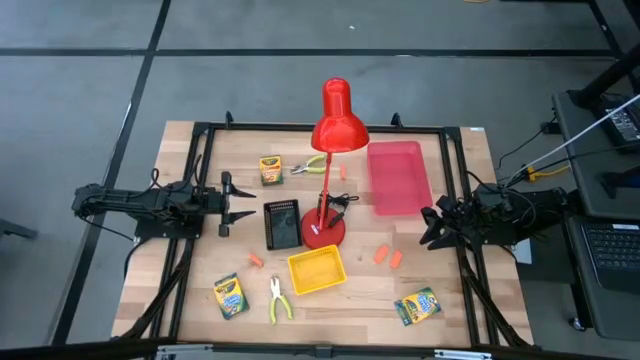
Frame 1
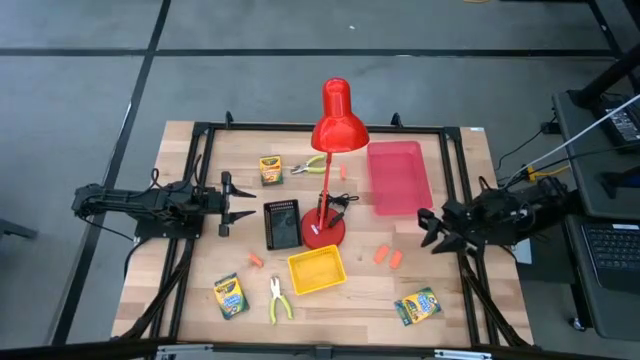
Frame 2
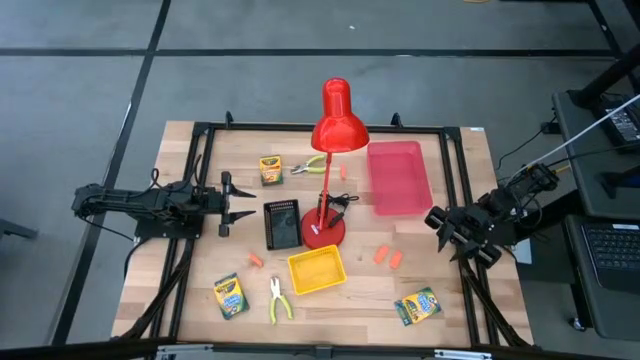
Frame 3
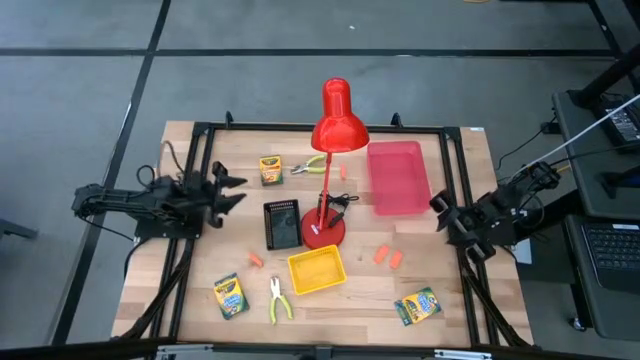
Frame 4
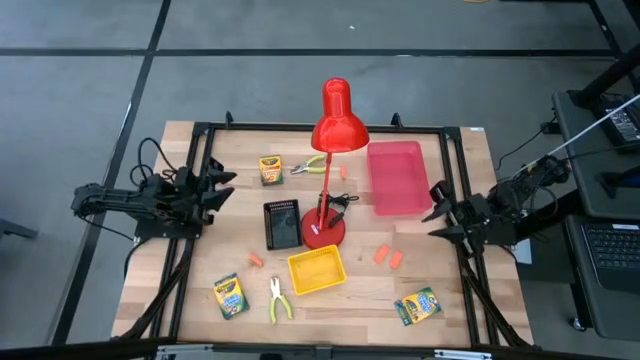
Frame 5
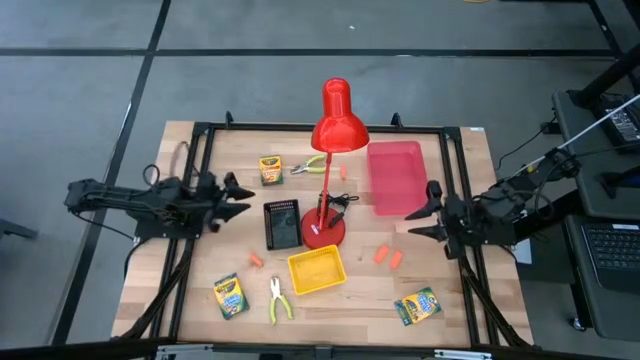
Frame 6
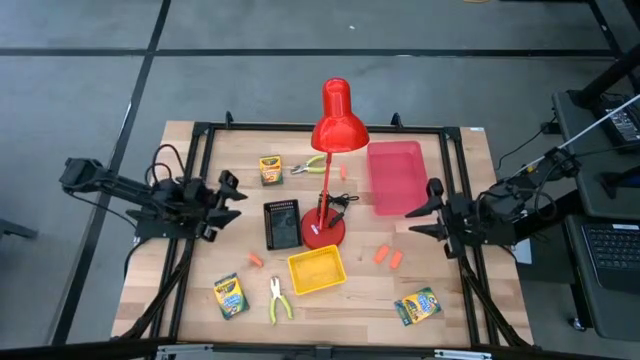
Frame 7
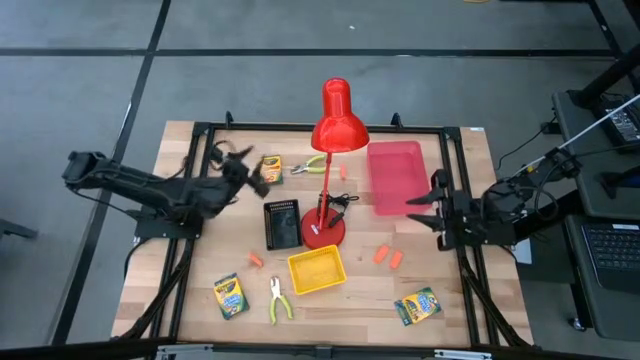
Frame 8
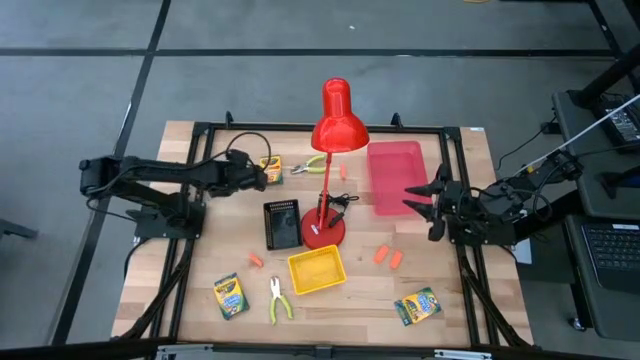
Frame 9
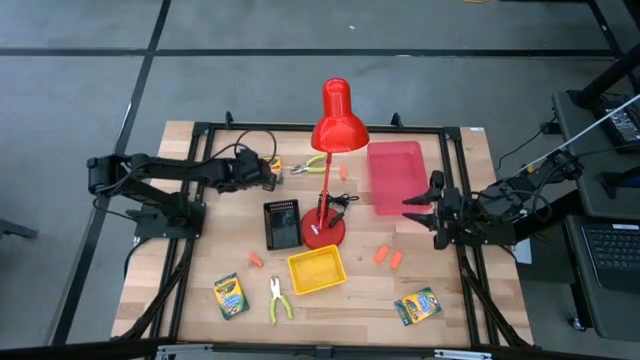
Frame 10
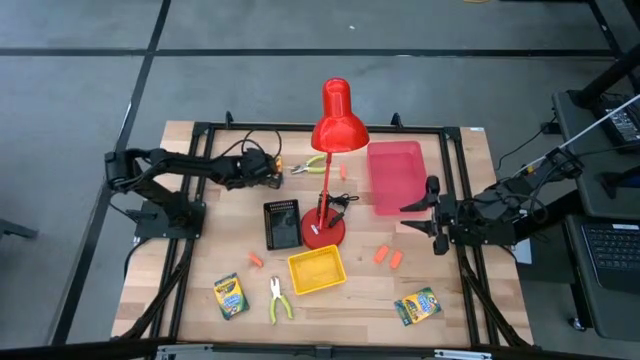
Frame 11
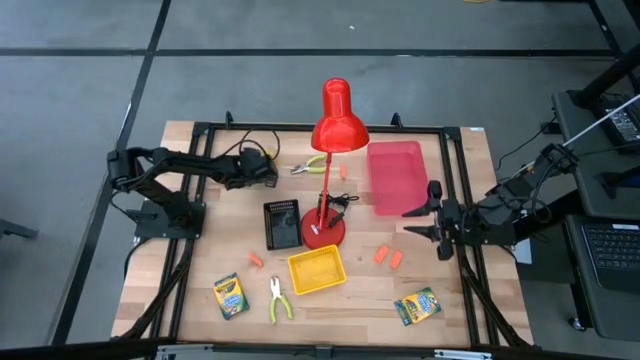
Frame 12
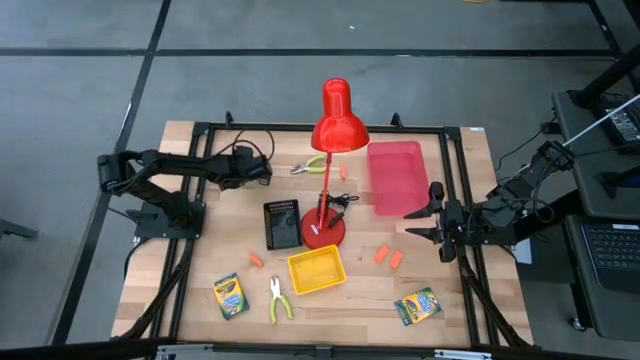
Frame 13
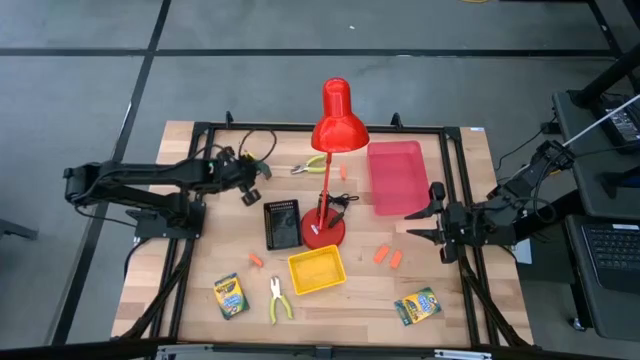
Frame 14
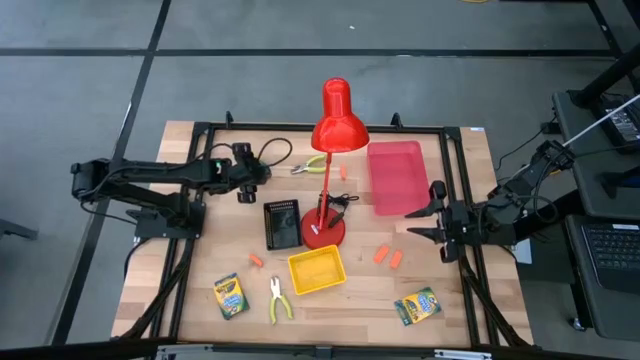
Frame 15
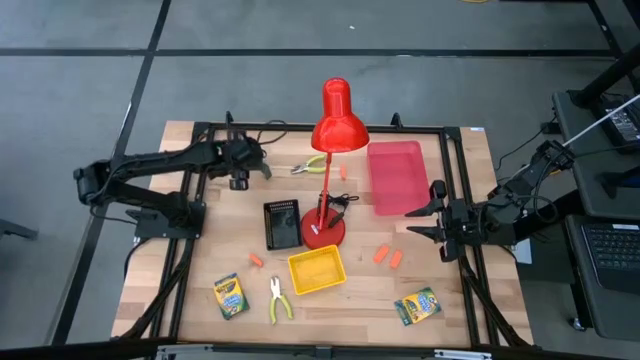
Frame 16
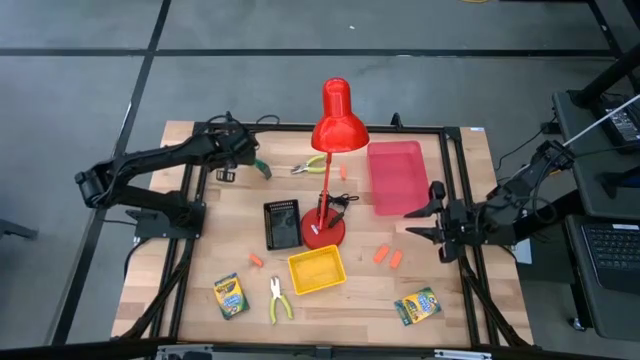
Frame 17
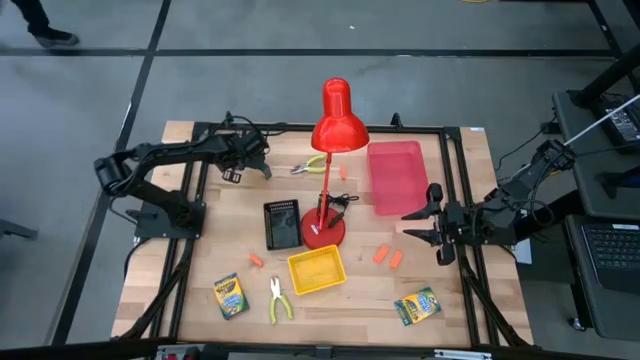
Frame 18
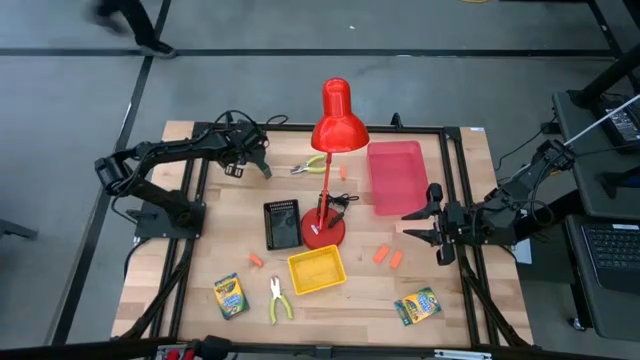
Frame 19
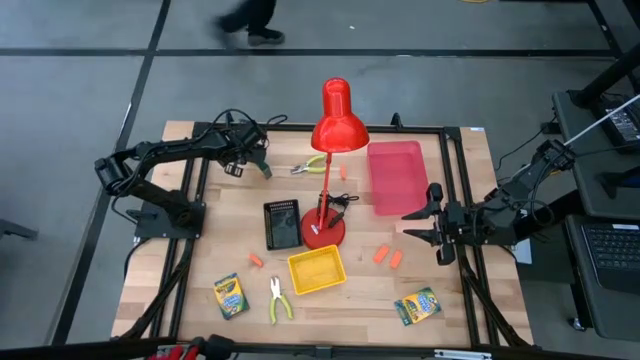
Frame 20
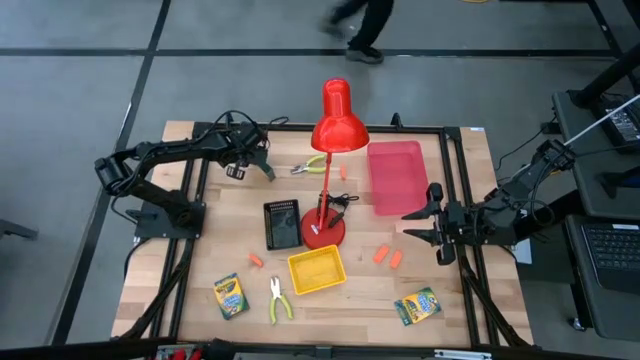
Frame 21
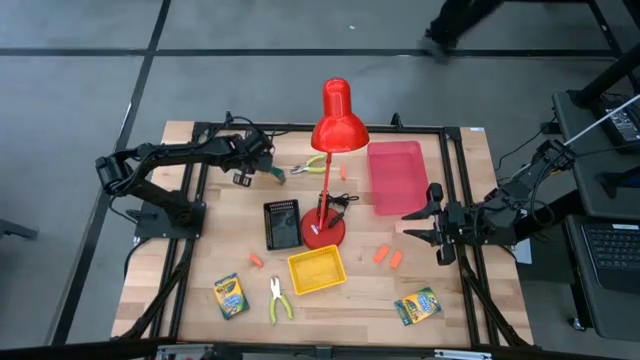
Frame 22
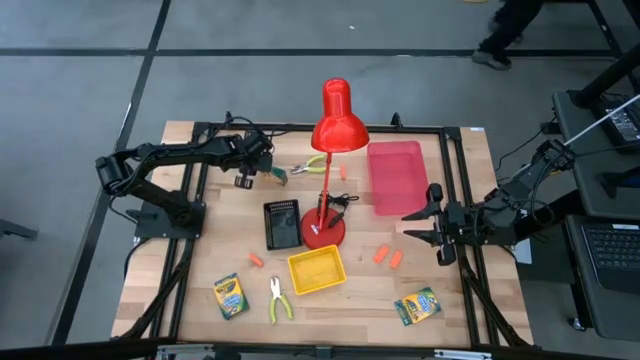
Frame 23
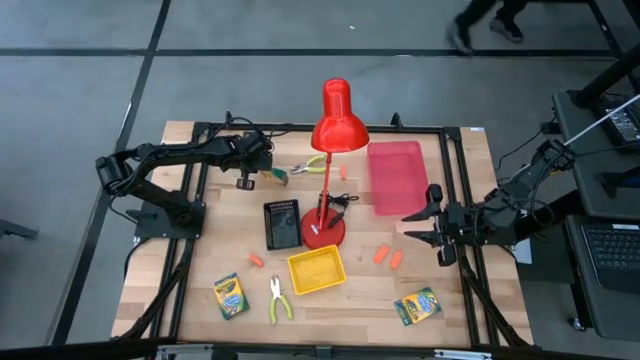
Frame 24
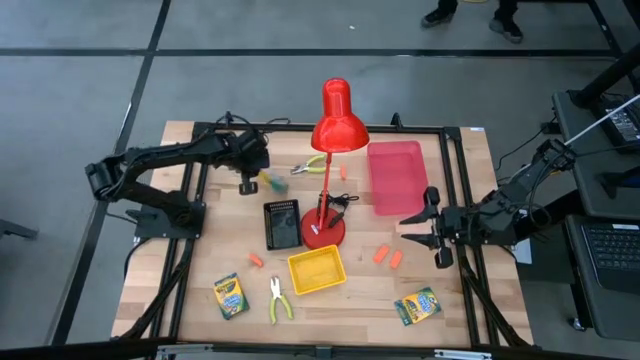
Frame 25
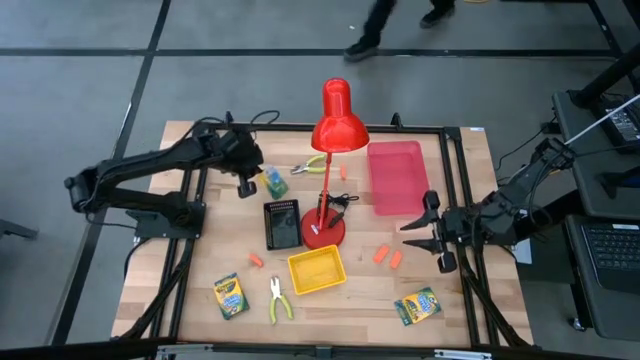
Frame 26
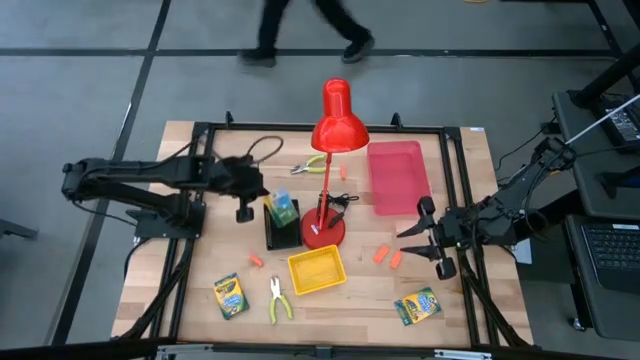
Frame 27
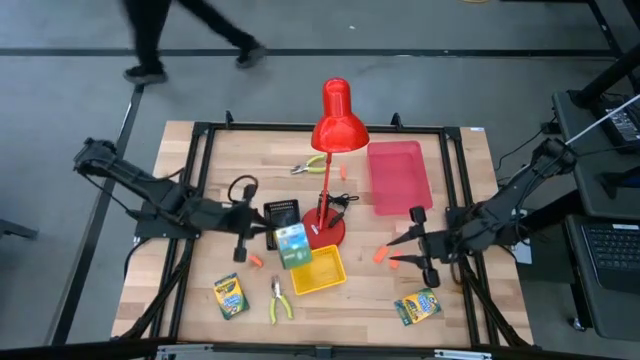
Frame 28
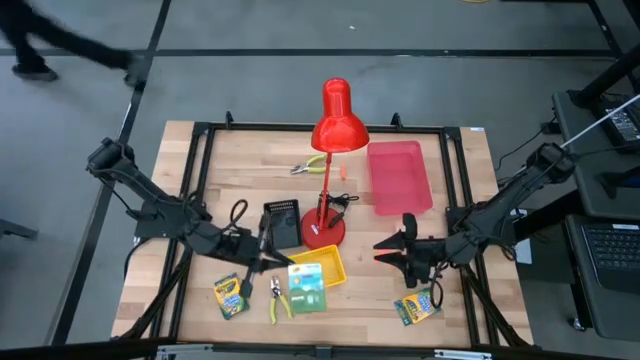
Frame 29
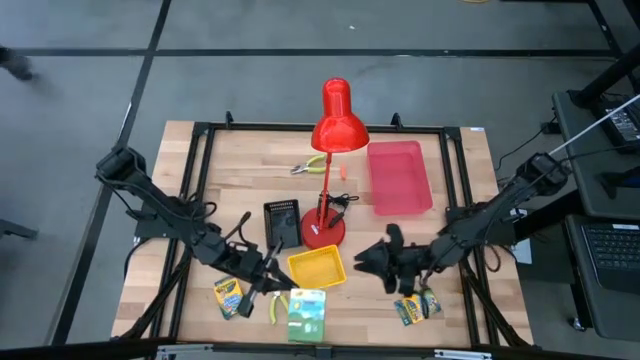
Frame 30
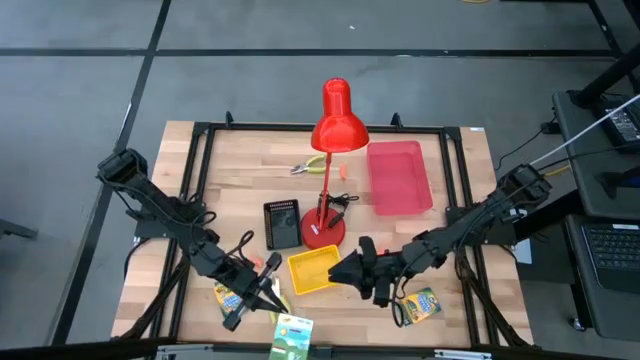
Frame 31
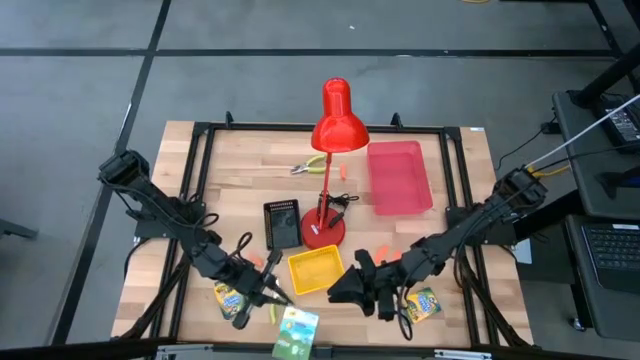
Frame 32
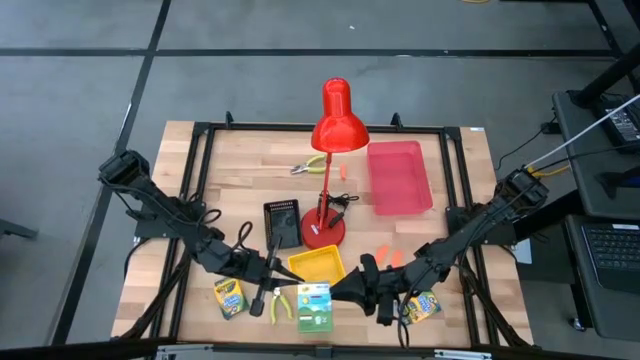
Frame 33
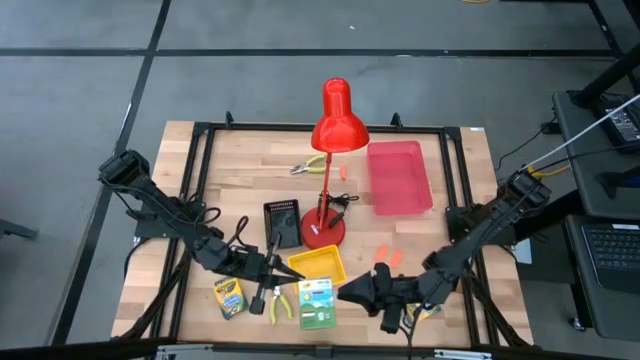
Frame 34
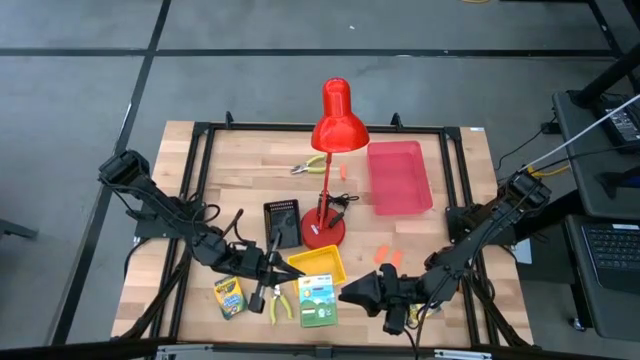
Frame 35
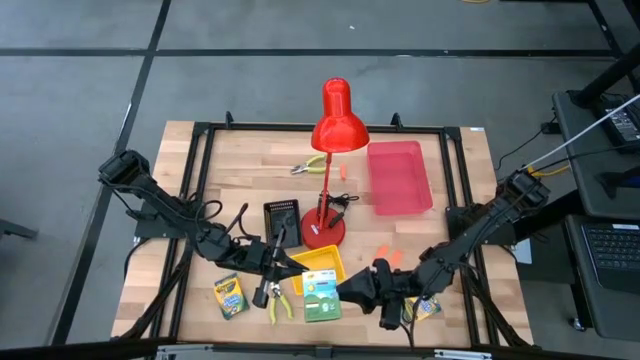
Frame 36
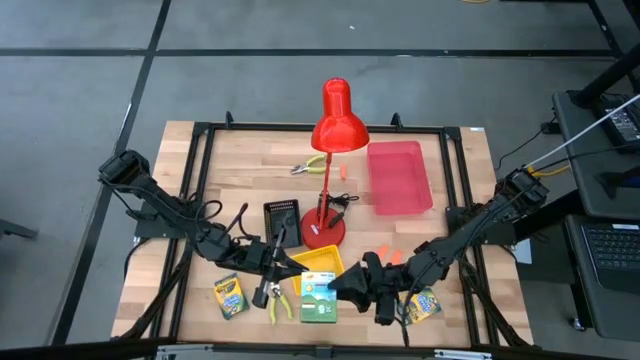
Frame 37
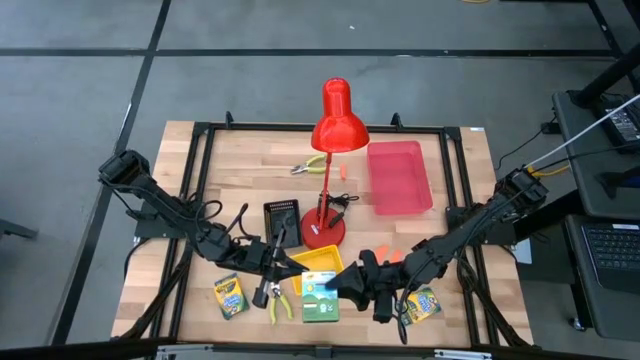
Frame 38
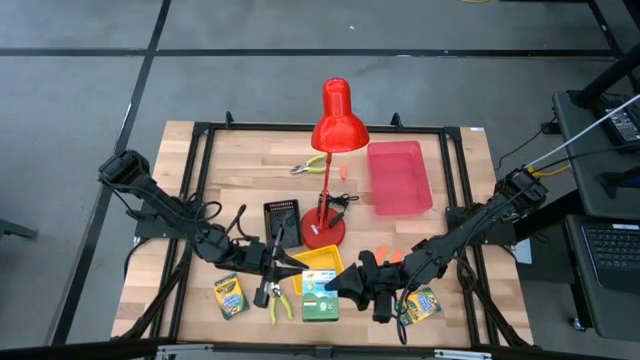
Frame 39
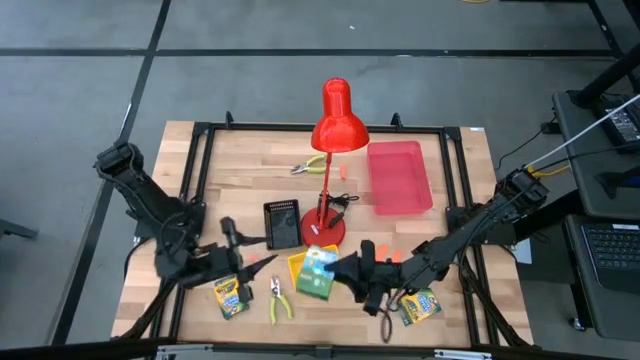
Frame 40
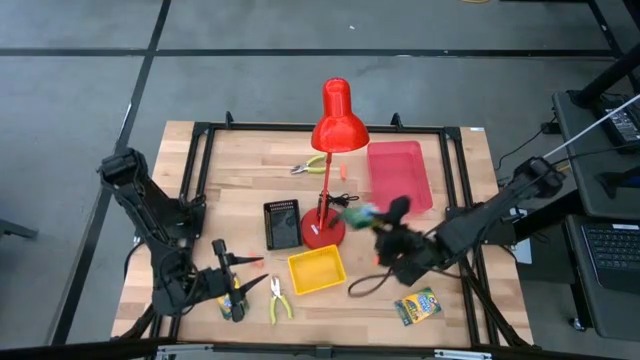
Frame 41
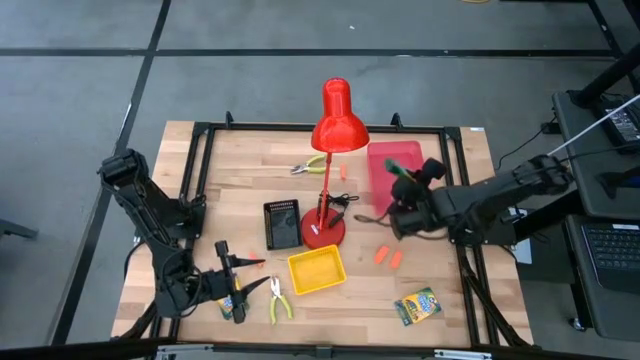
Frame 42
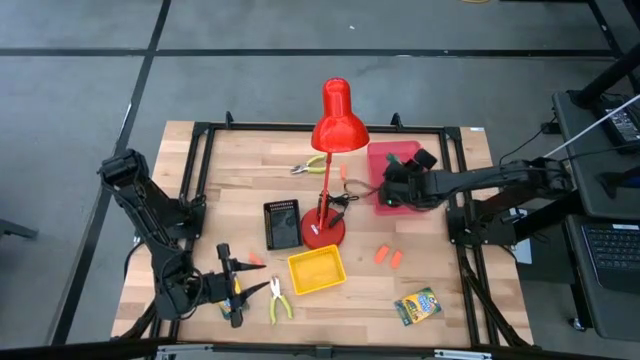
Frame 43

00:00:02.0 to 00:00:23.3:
Task: Pick & Place School Supplies
Put the crayon box into the pink bin
